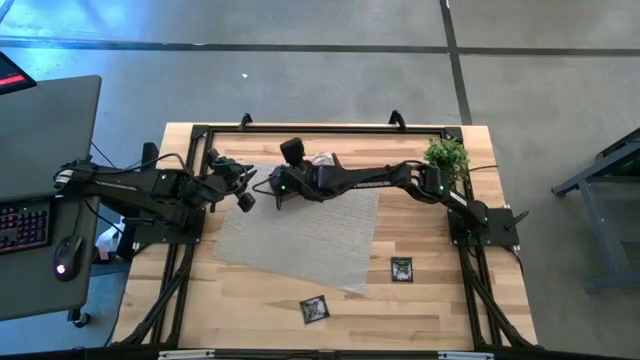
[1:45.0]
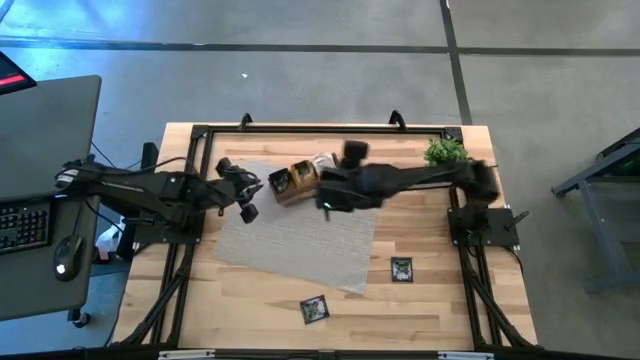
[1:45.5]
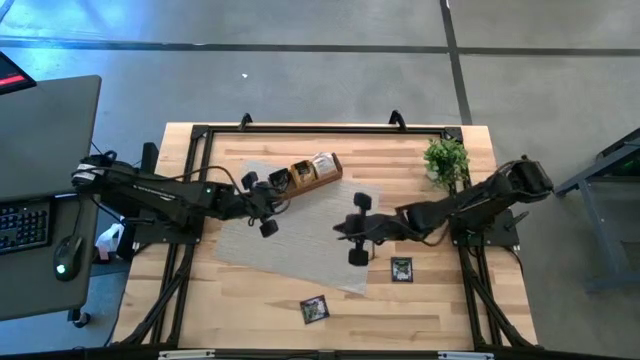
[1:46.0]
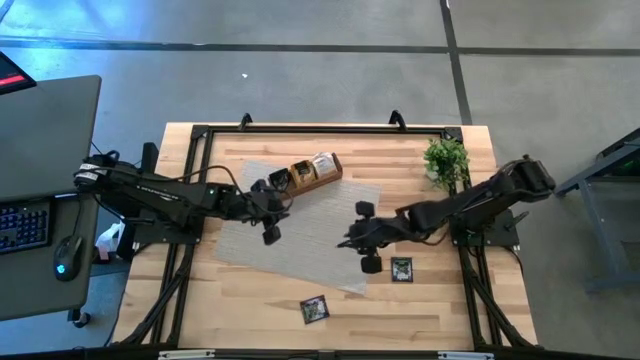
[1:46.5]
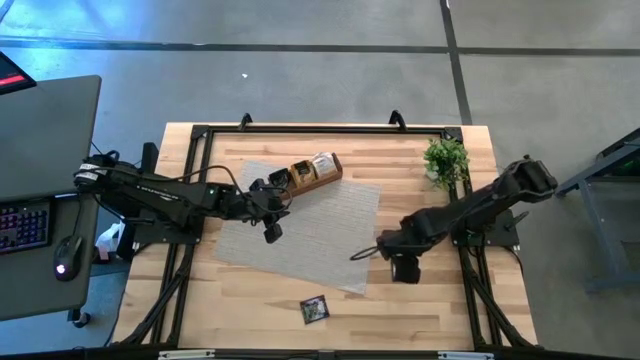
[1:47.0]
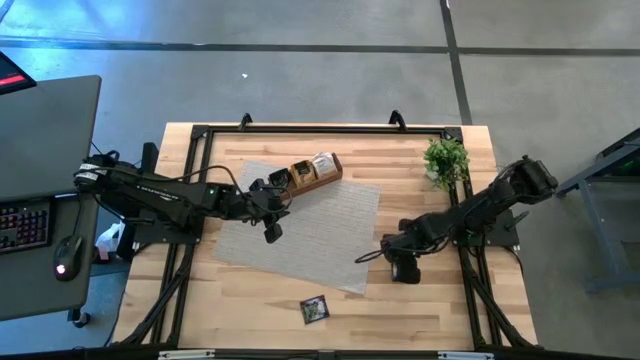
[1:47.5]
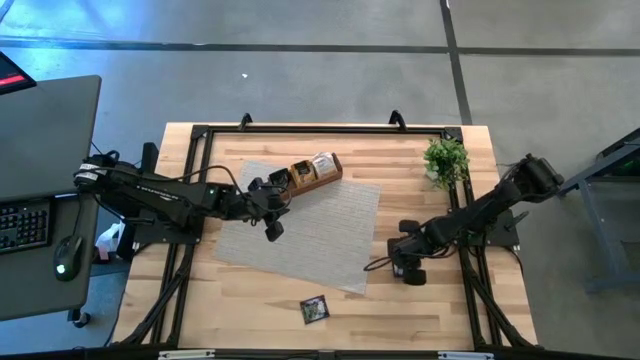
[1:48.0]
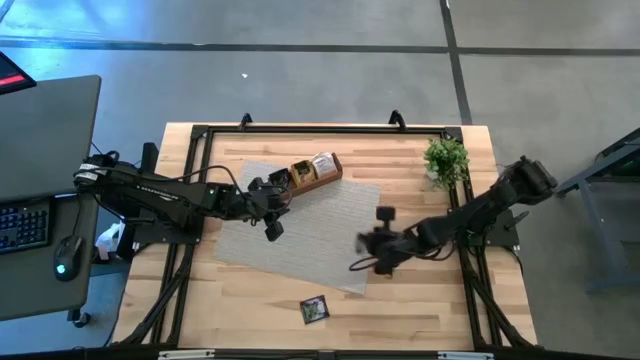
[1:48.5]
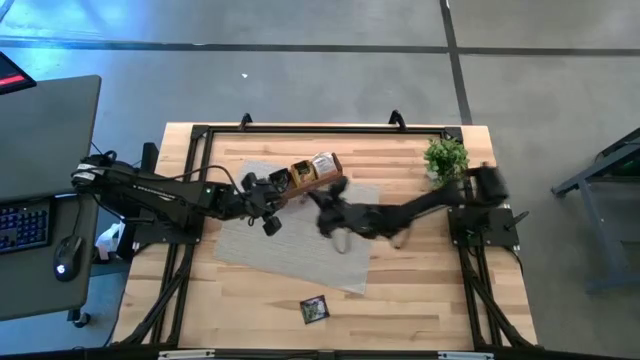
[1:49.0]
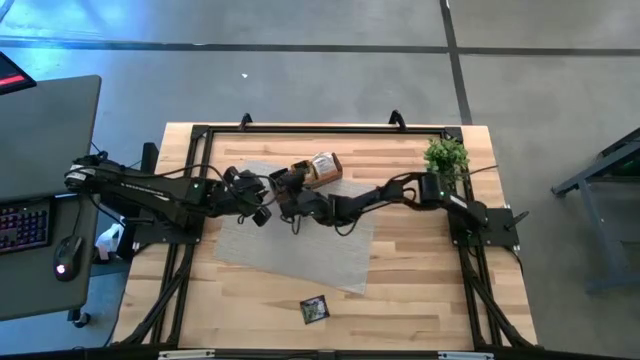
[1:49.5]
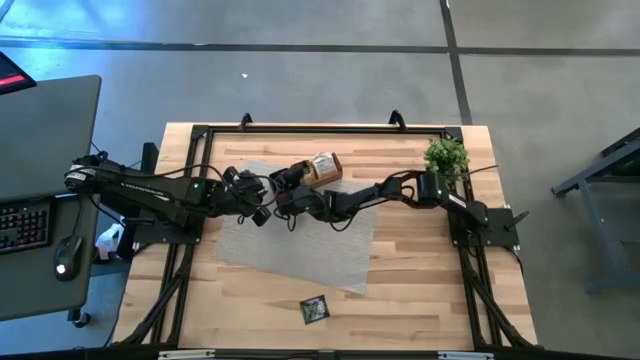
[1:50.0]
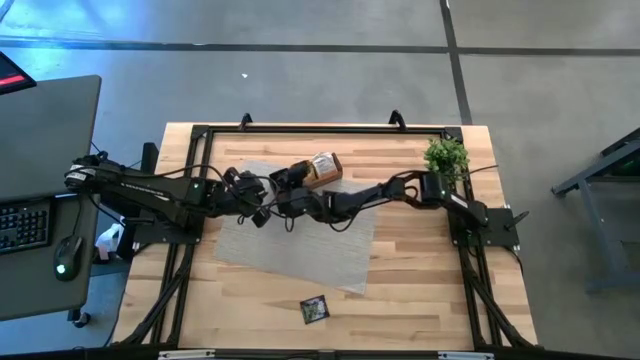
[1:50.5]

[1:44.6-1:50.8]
Task: Pick & Place Tea
Put the purple tea bag into the left section of the wooden organizer

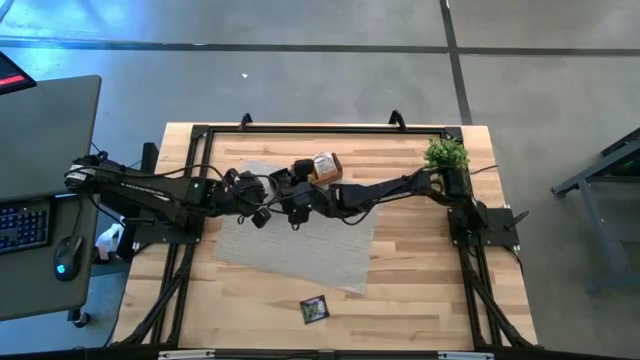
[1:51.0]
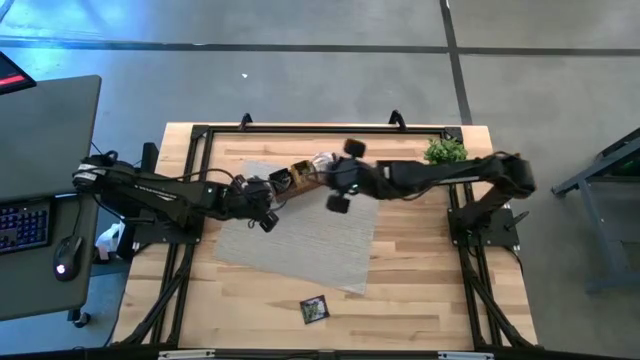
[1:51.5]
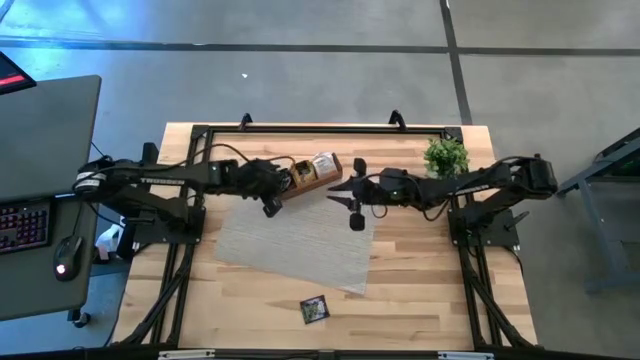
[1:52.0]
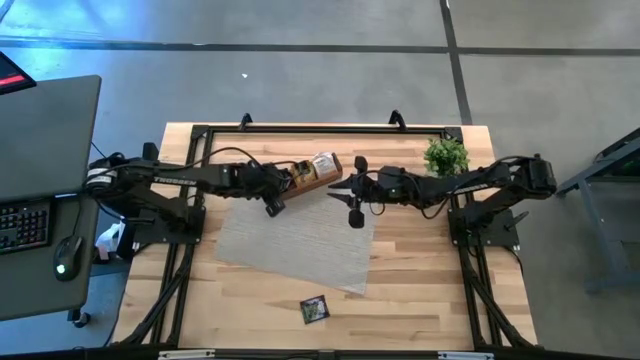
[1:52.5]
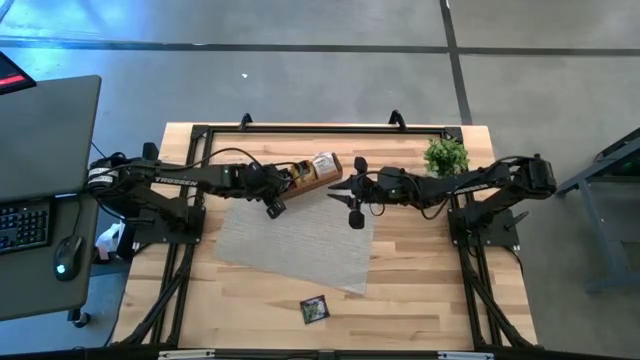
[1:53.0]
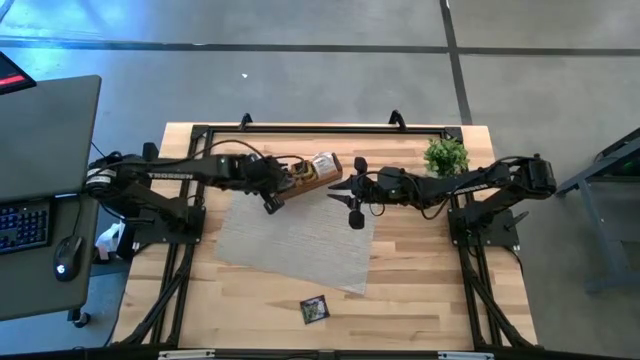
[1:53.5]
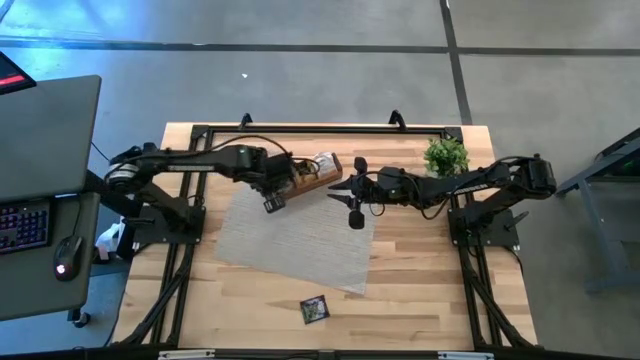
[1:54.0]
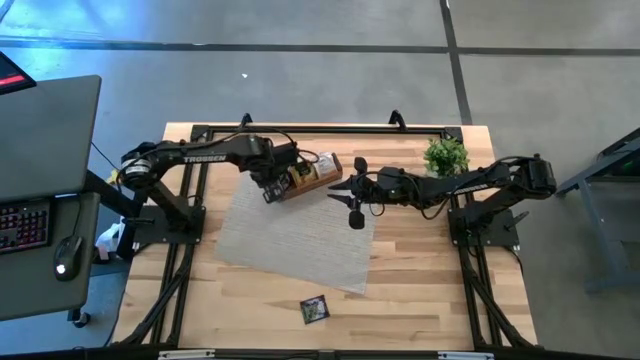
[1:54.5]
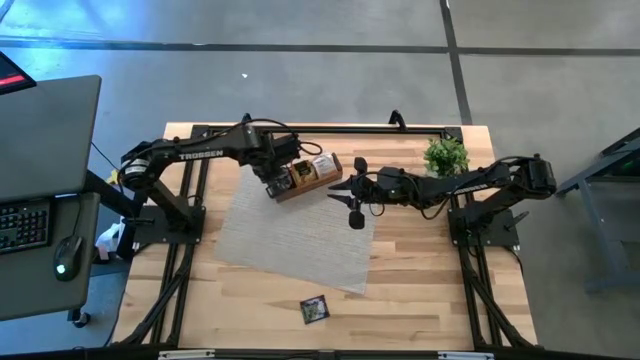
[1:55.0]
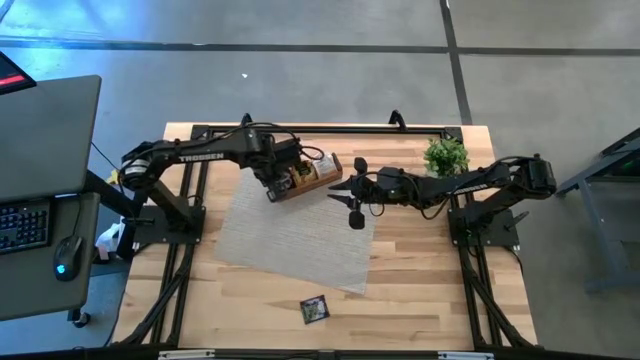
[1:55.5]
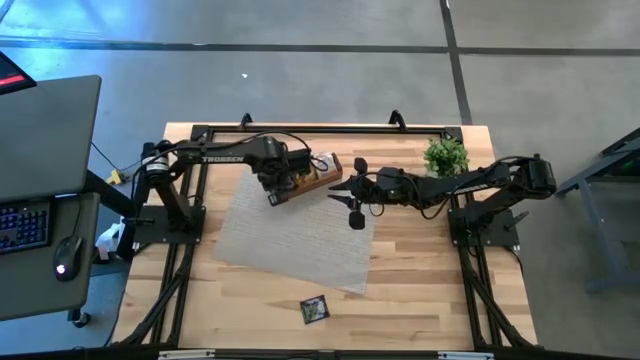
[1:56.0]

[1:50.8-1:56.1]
Adjust the purple tea bag into the left section of the wooden organizer

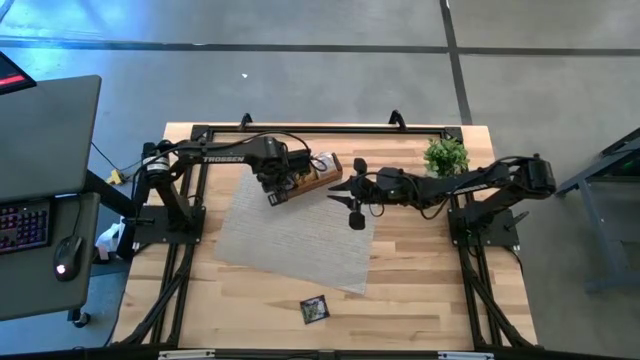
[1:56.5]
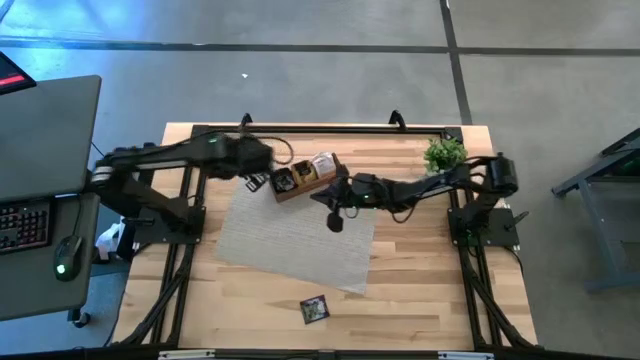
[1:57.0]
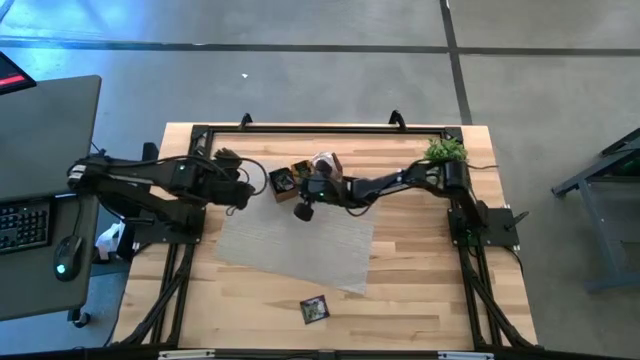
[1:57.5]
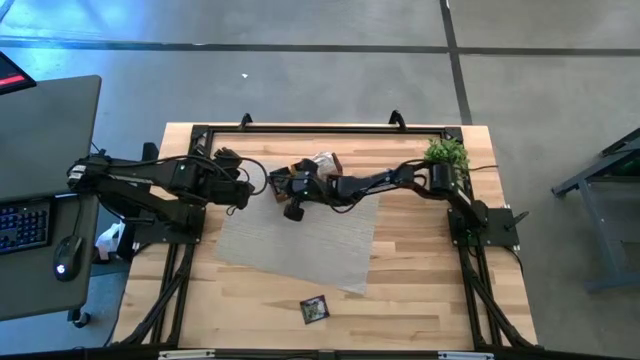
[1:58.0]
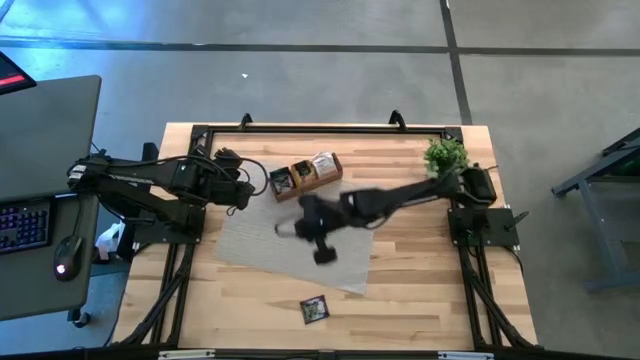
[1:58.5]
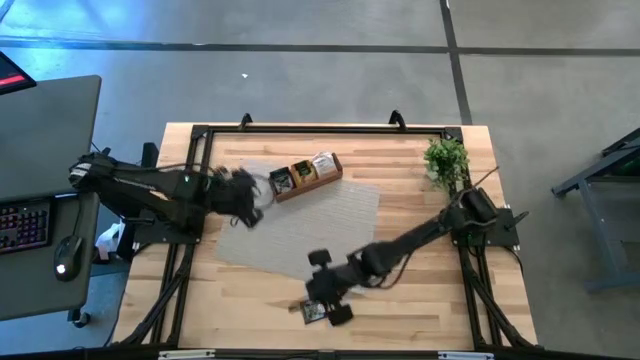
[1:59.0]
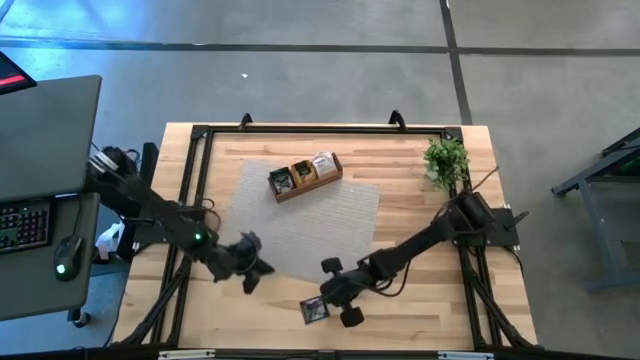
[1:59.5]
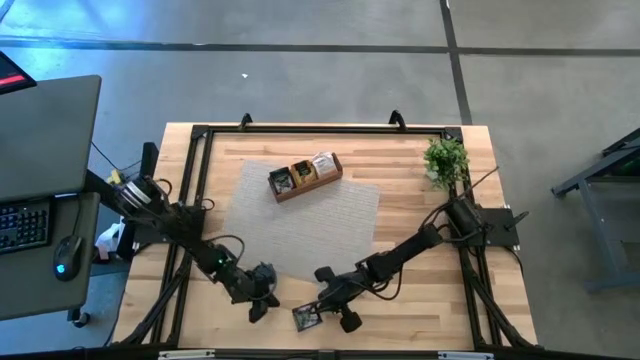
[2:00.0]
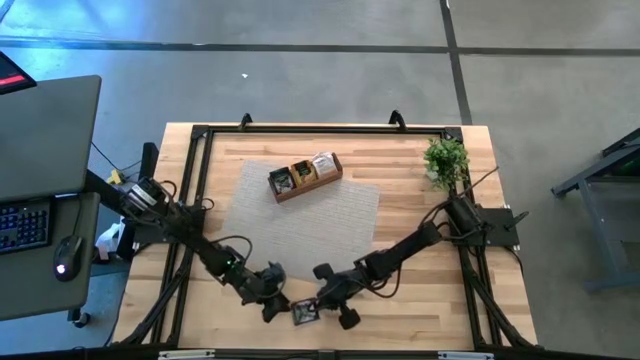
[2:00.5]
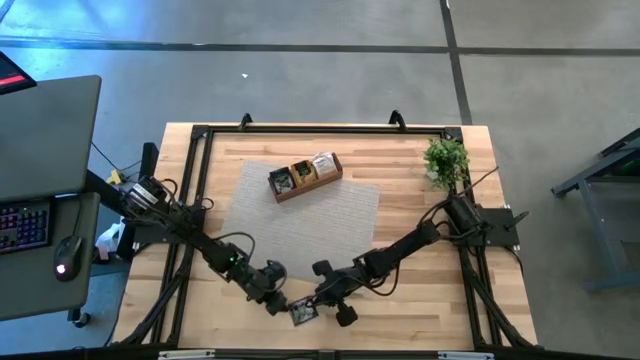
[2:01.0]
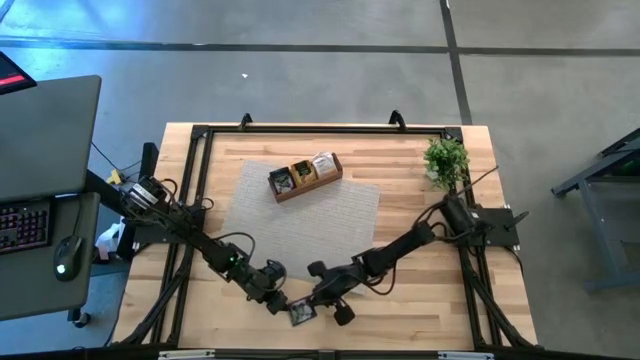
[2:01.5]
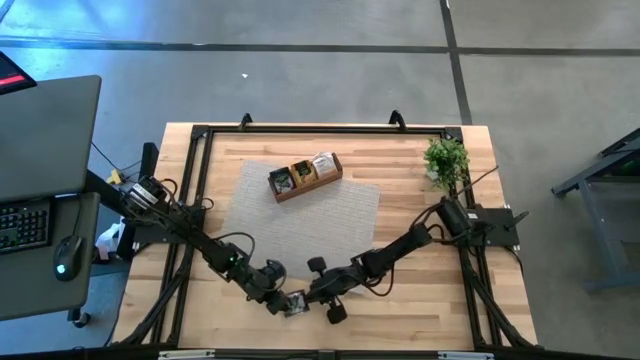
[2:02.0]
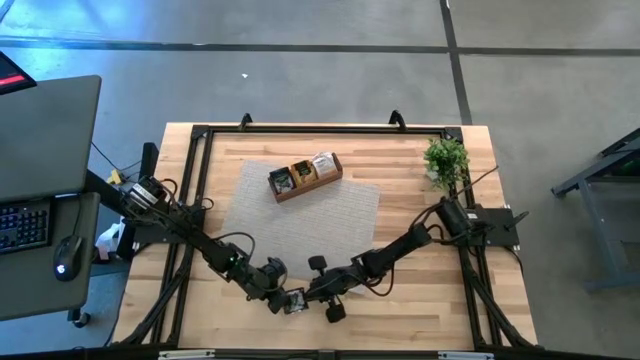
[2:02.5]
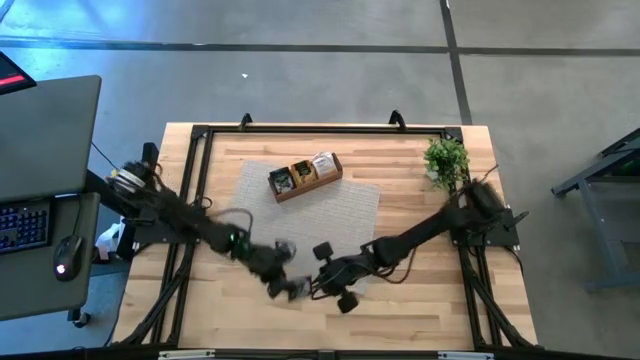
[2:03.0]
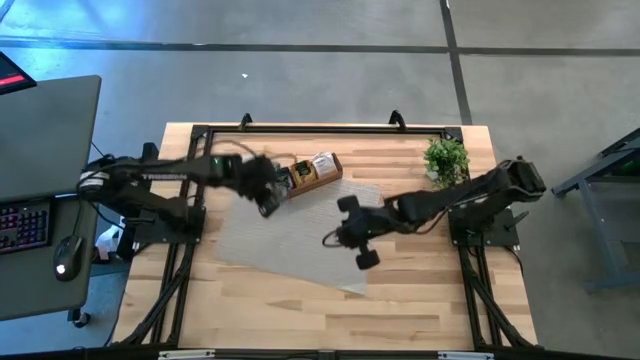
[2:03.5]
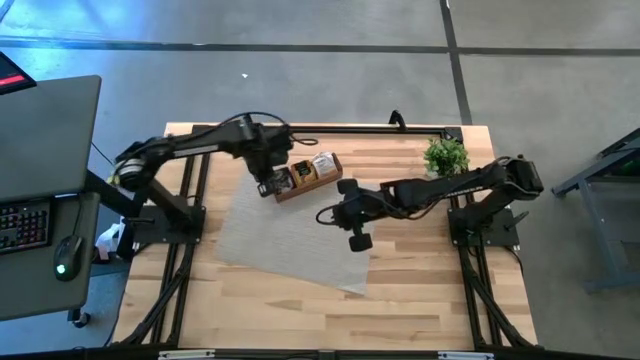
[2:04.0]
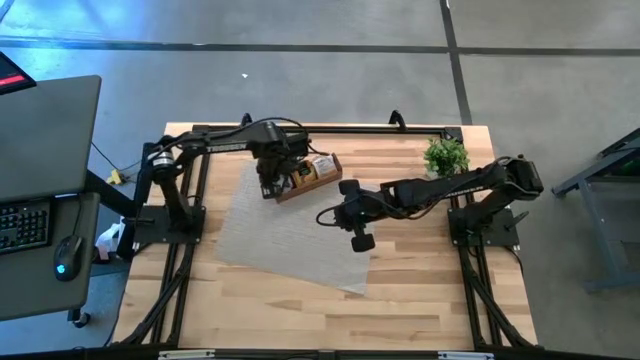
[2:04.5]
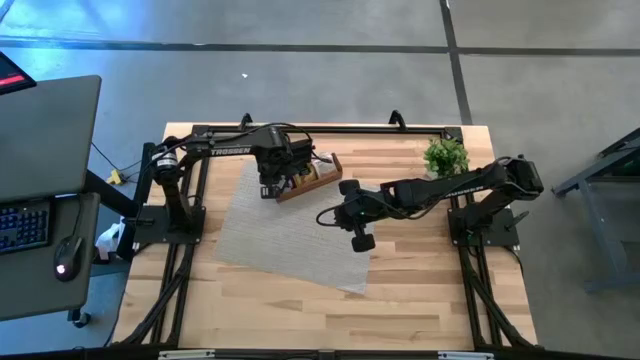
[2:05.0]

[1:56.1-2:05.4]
Put the purple tea bag into the left section of the wooden organizer
